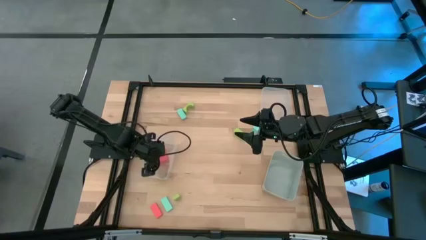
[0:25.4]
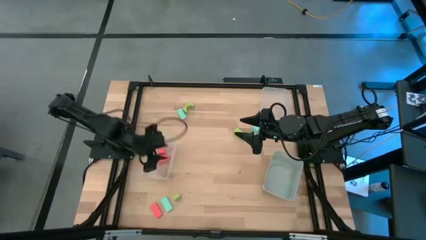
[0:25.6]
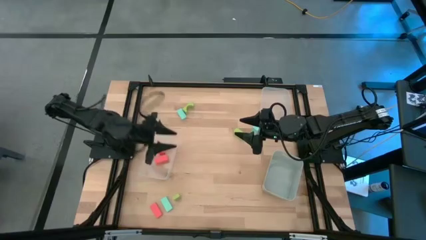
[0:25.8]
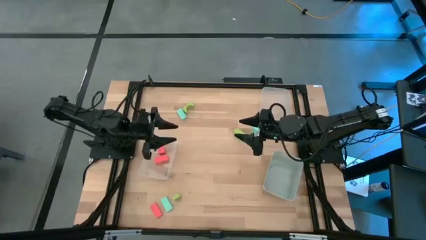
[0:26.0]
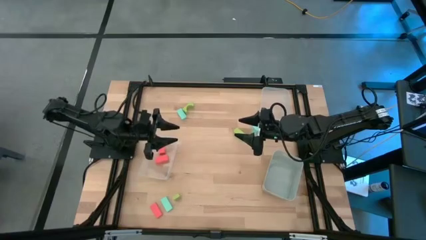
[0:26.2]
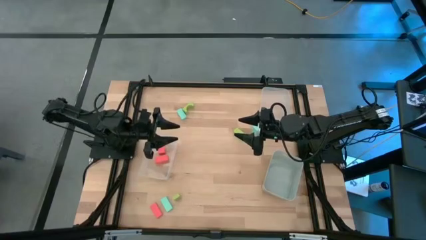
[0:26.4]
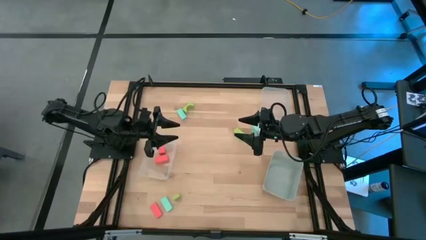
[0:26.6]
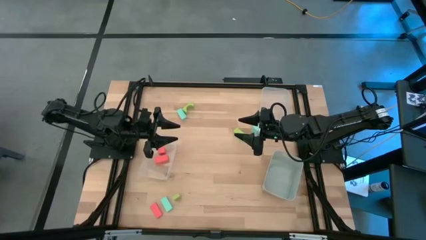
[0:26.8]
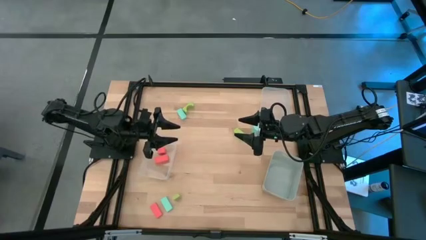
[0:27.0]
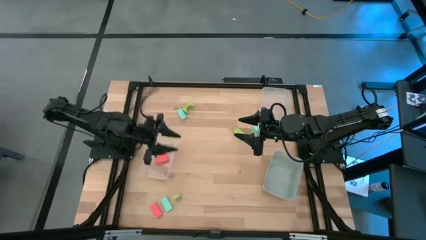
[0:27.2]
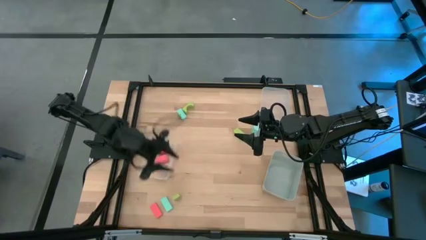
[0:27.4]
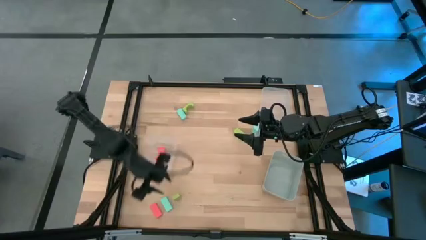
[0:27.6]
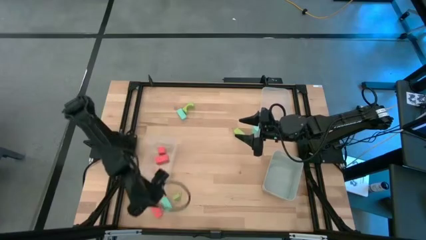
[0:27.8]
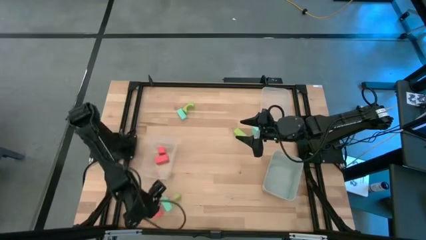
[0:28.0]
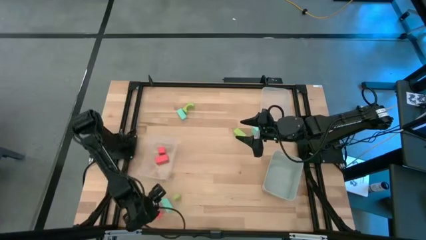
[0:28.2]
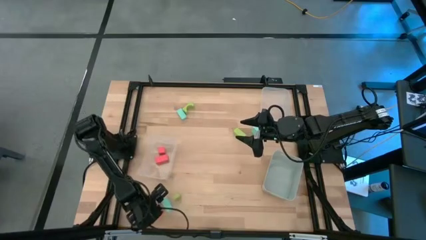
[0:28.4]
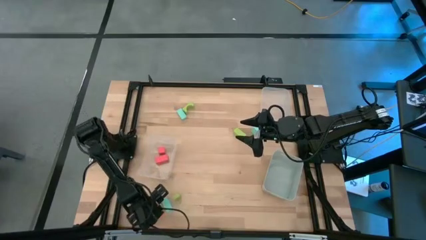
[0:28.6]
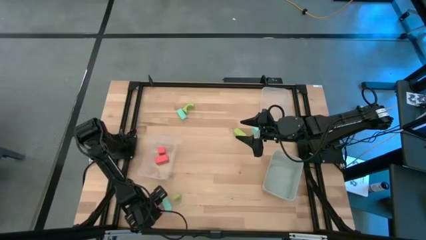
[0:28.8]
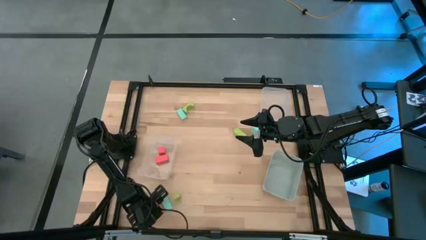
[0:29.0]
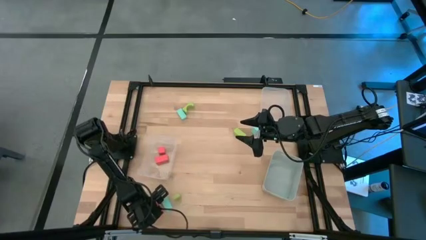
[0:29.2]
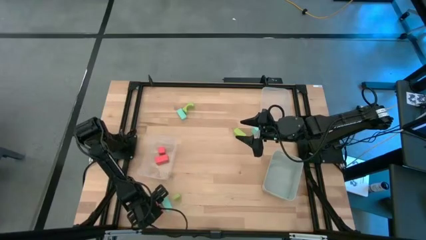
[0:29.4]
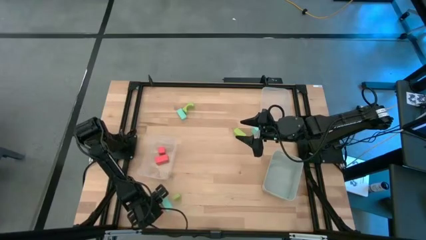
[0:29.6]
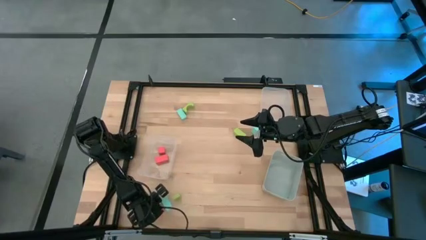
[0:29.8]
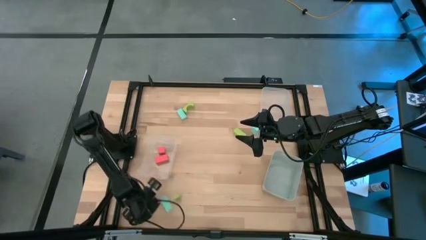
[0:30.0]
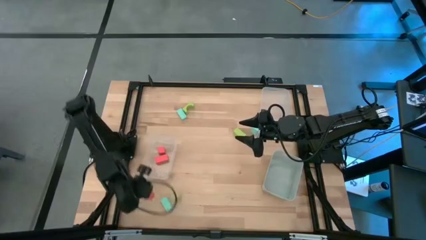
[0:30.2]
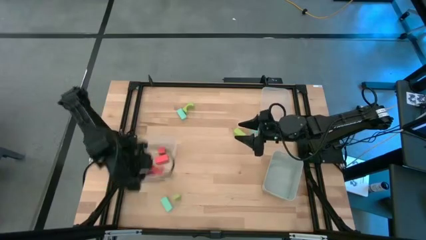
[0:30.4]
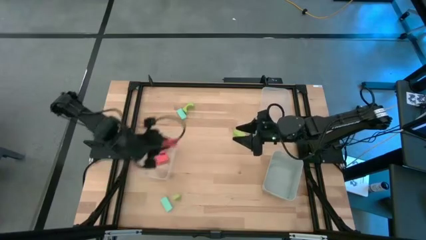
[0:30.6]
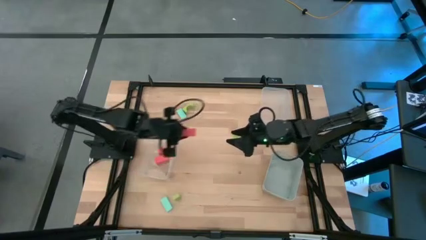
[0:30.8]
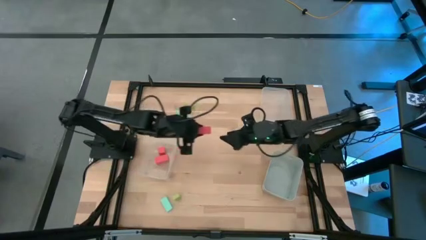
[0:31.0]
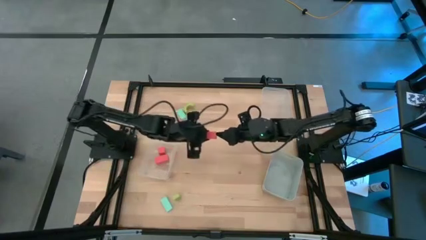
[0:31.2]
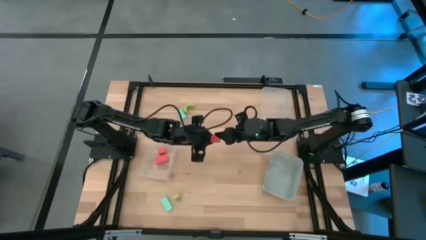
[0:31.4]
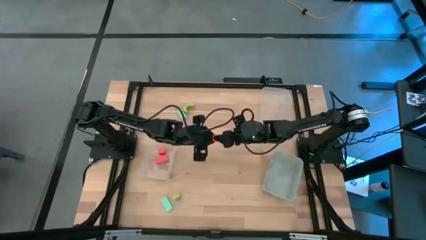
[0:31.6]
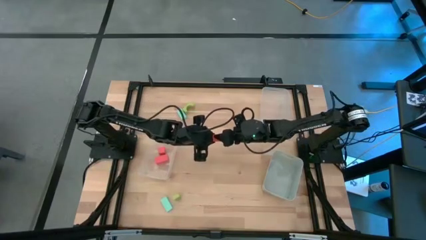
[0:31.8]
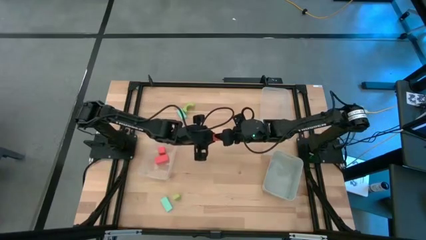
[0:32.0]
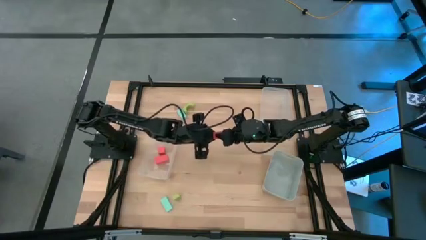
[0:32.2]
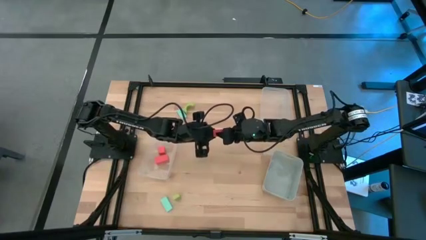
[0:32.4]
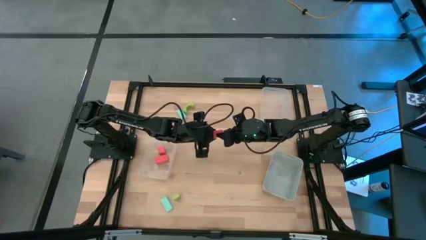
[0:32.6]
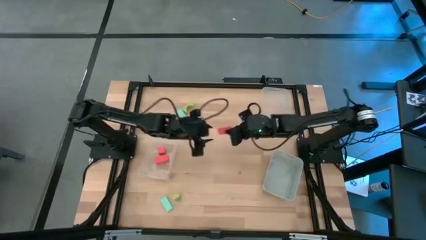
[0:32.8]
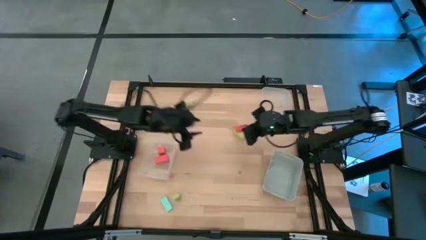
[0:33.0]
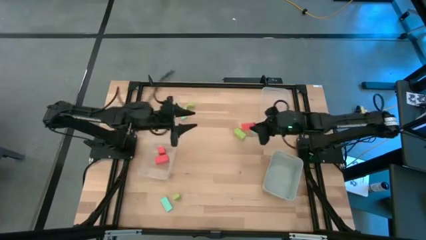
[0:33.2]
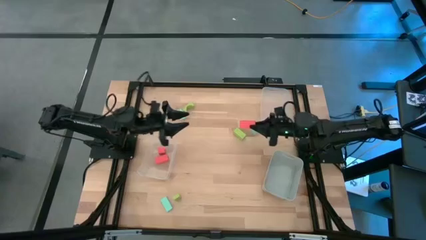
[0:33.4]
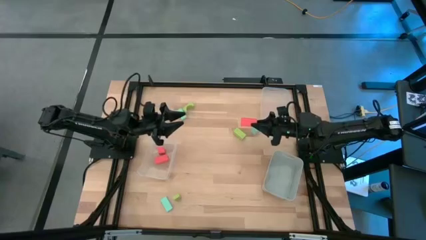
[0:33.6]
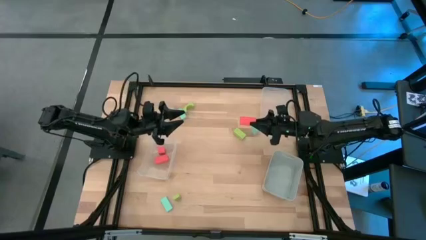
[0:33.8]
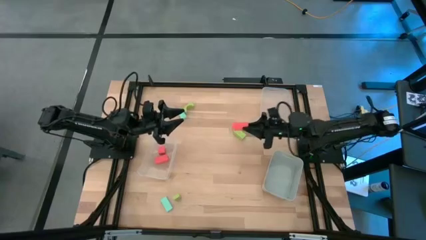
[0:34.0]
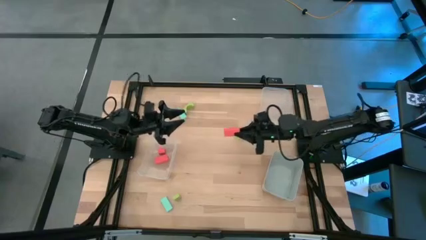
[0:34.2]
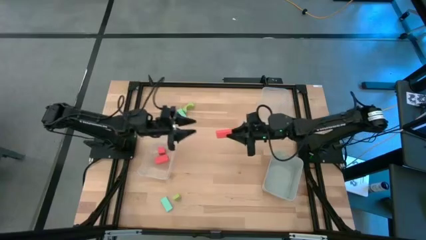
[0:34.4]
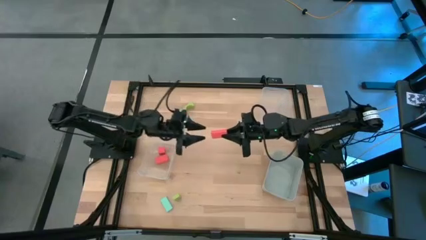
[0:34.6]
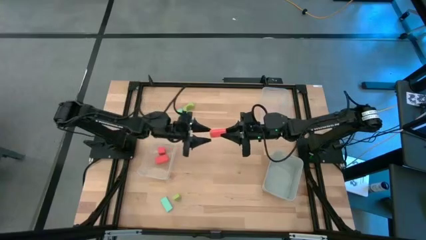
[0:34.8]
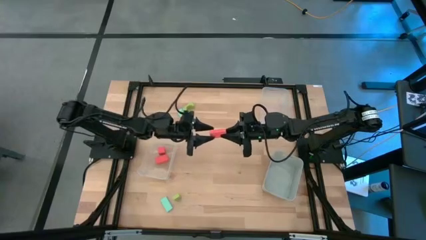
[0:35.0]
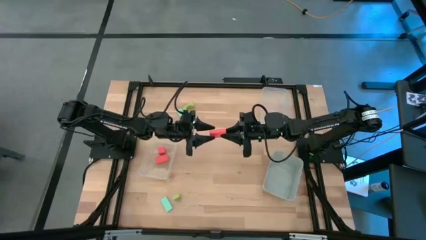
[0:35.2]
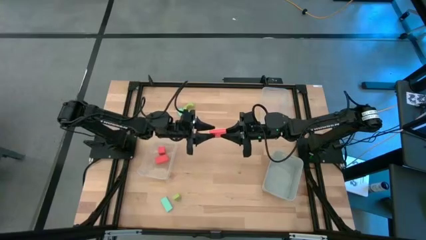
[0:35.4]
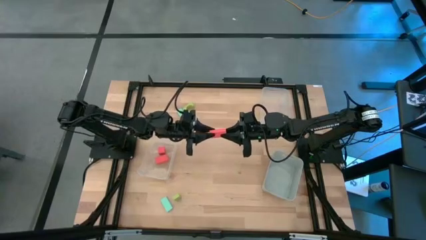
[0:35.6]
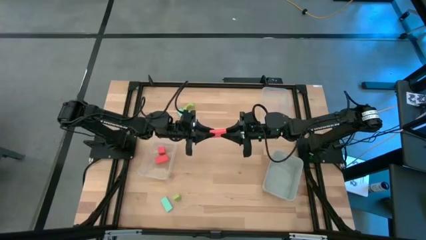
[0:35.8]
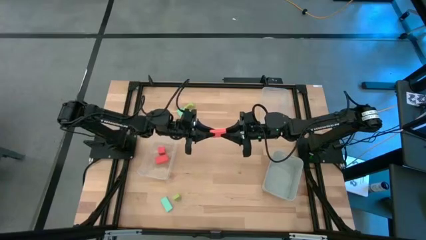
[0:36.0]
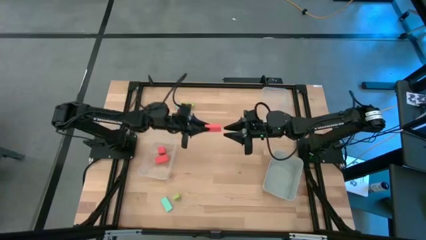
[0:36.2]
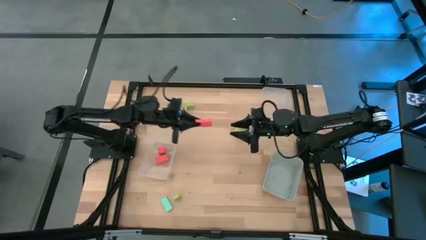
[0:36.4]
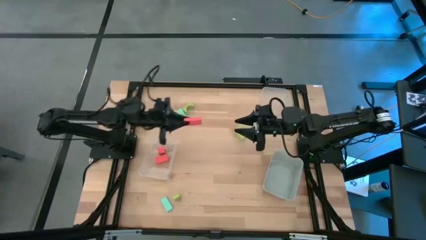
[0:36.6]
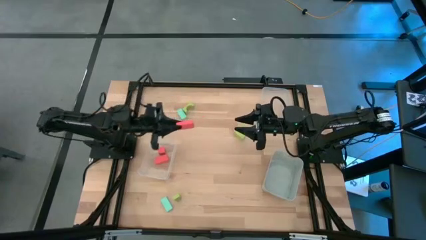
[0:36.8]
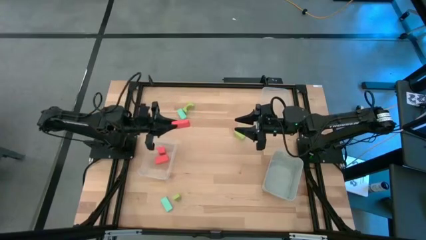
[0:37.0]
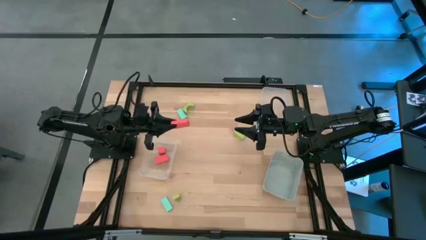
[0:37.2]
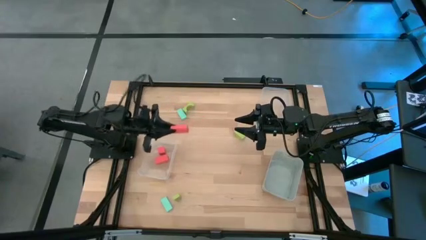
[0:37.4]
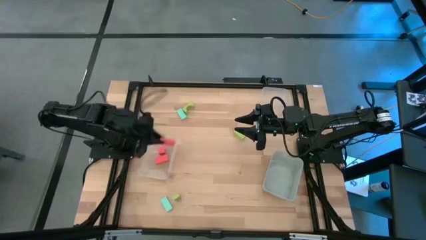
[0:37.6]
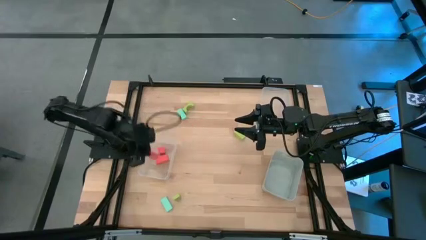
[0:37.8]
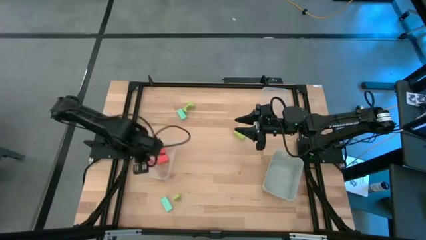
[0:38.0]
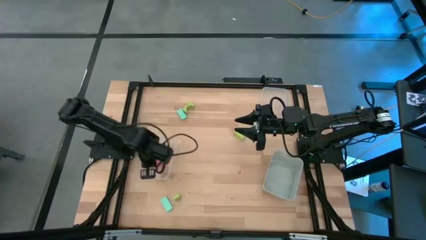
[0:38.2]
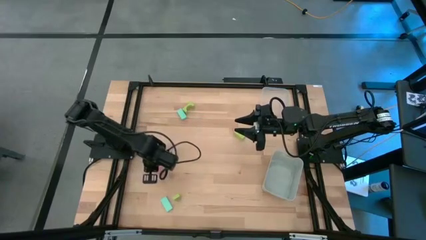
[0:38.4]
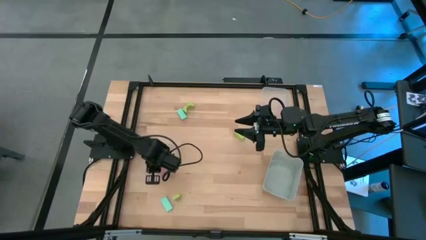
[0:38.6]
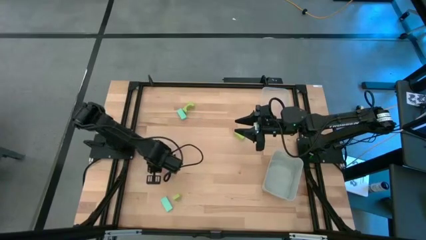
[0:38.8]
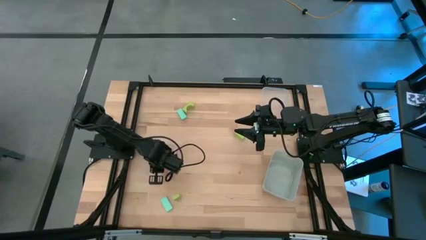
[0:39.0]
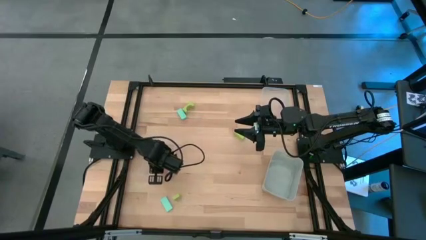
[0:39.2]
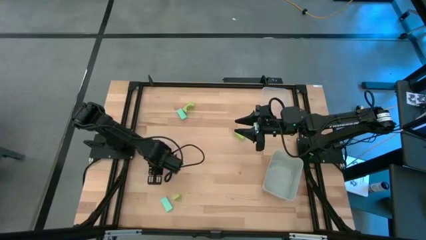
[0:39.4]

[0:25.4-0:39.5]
Task: Sort & place blocks by color
Put the orange block into the middle left transparent bin
